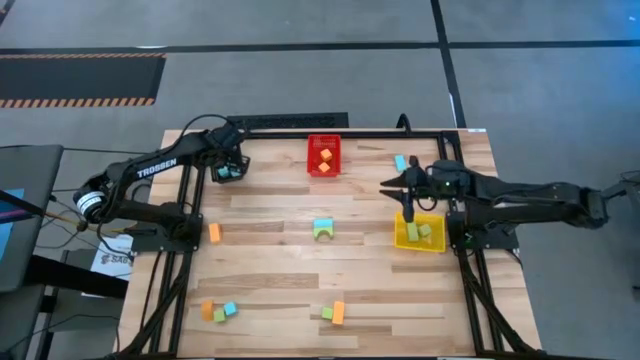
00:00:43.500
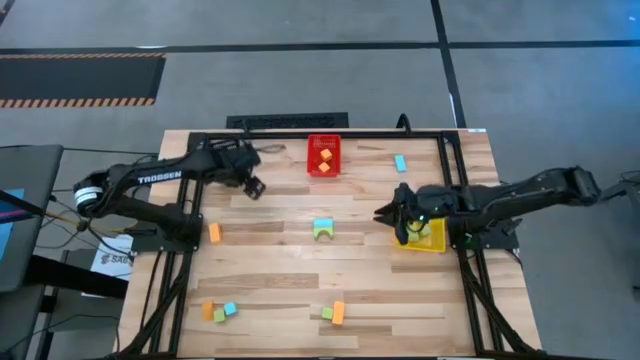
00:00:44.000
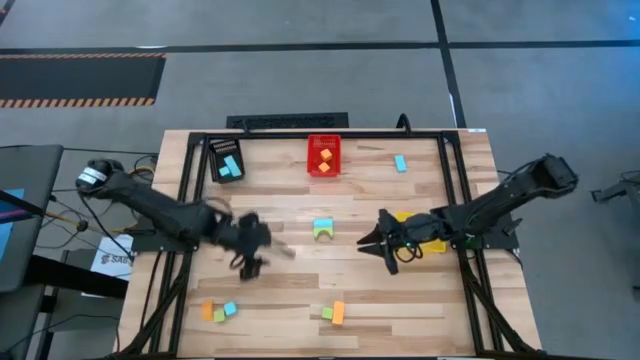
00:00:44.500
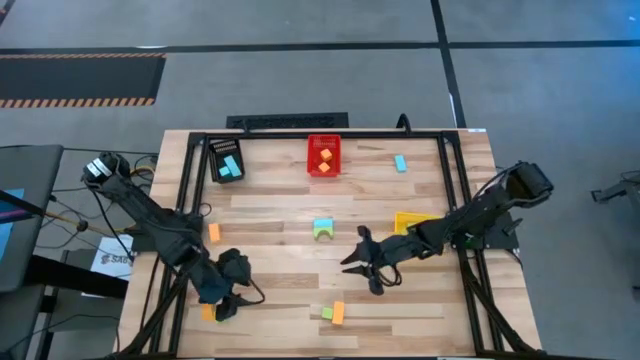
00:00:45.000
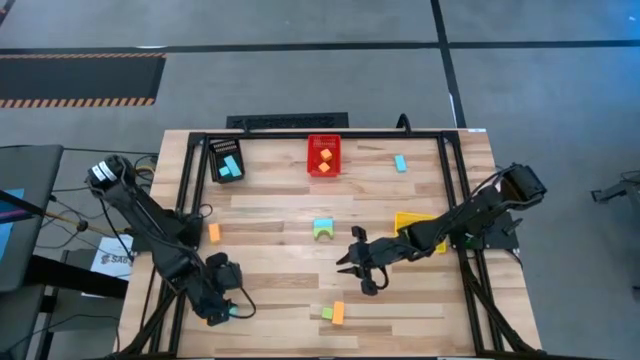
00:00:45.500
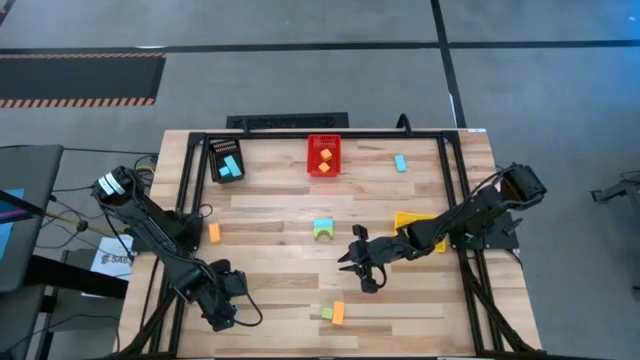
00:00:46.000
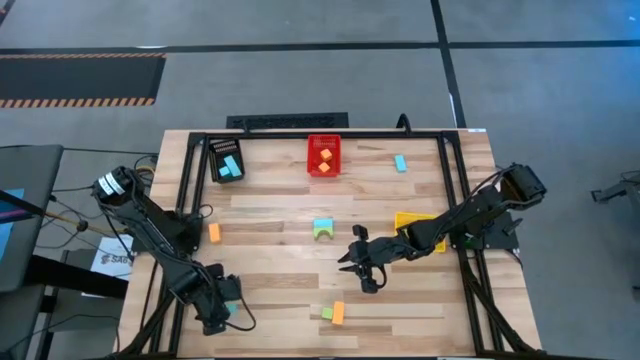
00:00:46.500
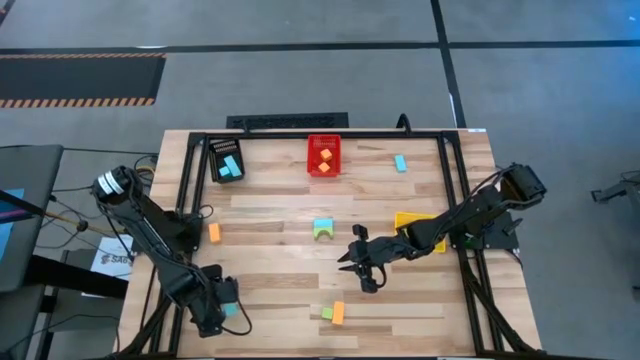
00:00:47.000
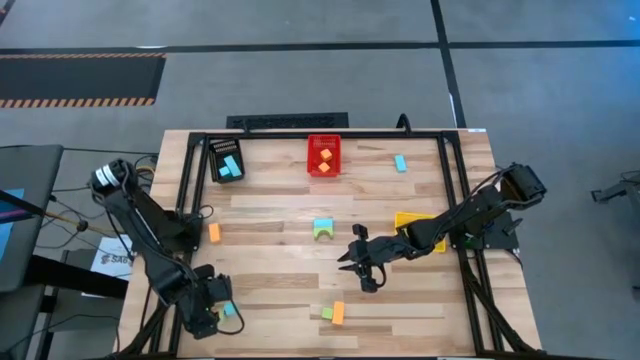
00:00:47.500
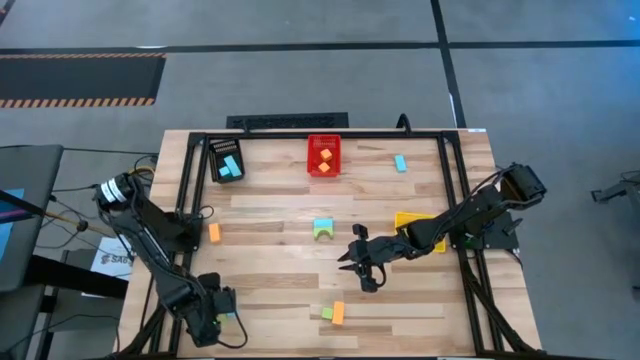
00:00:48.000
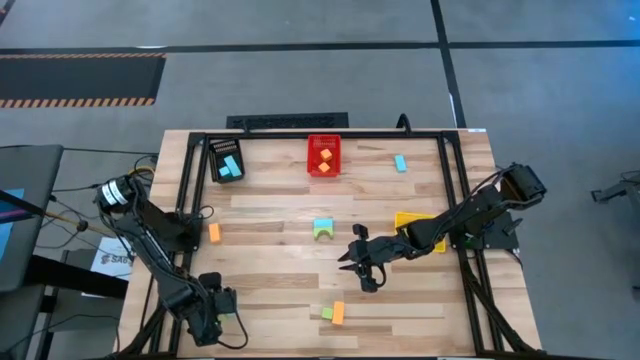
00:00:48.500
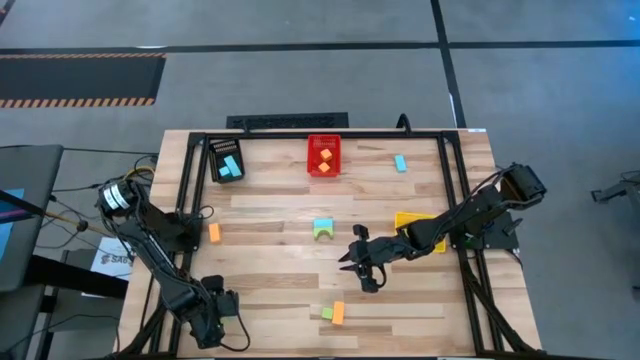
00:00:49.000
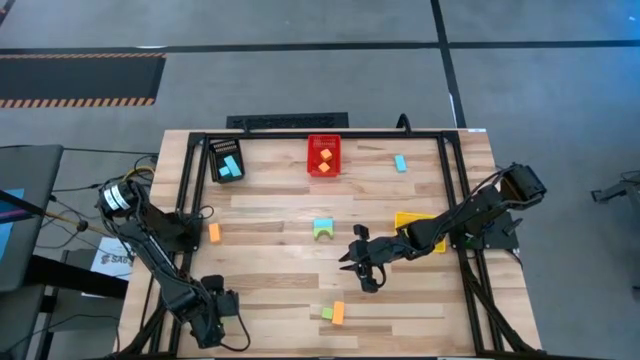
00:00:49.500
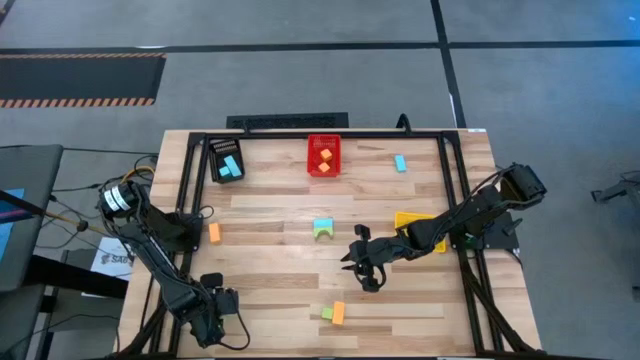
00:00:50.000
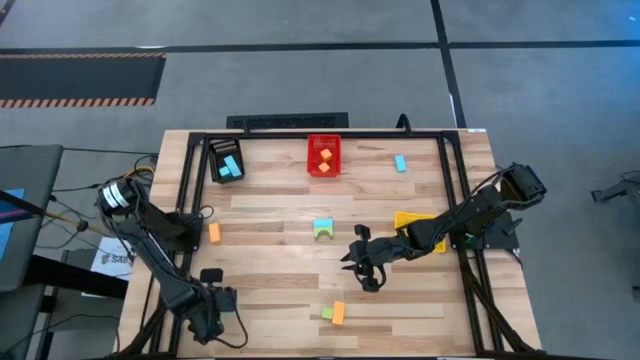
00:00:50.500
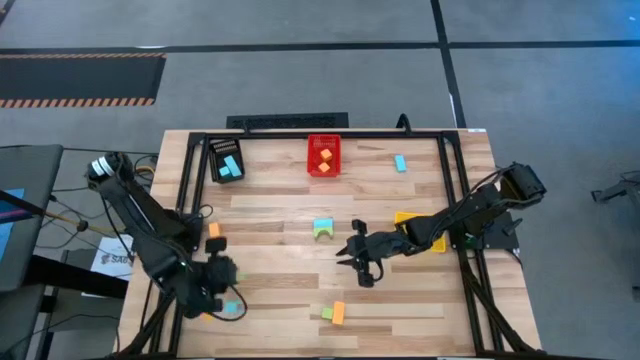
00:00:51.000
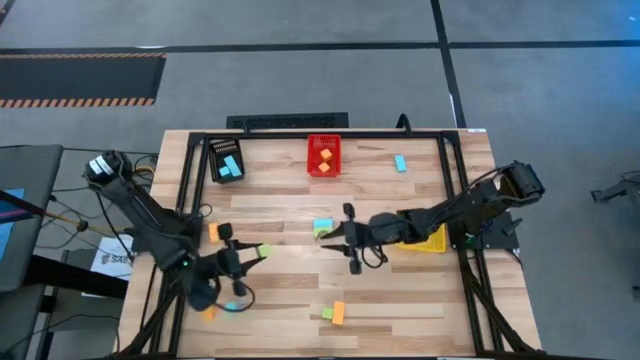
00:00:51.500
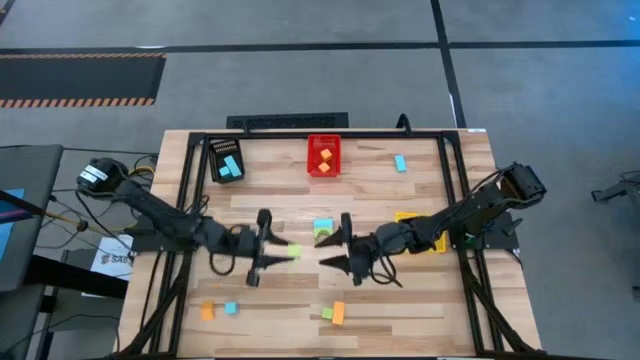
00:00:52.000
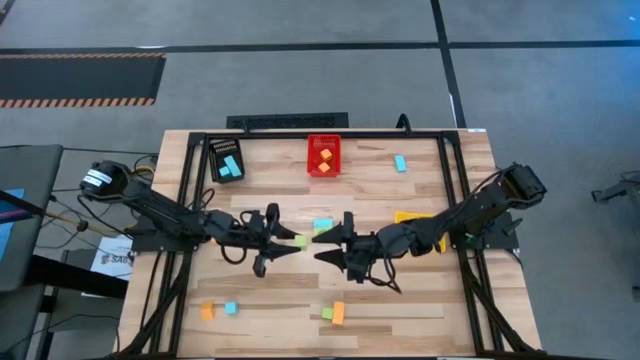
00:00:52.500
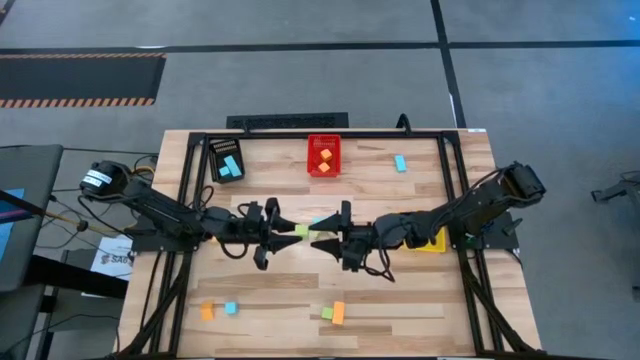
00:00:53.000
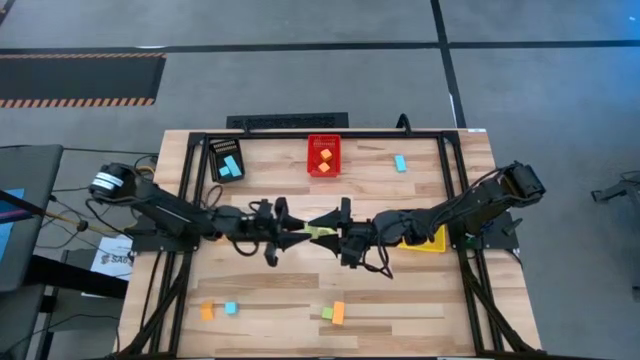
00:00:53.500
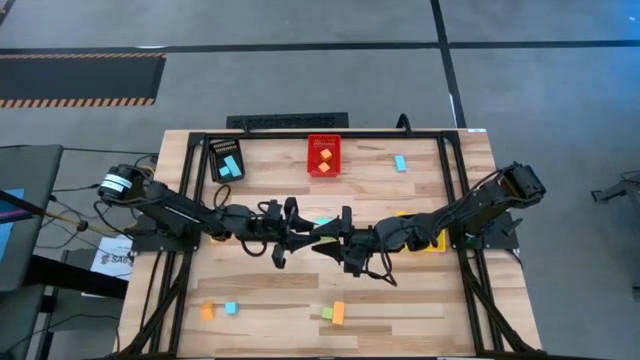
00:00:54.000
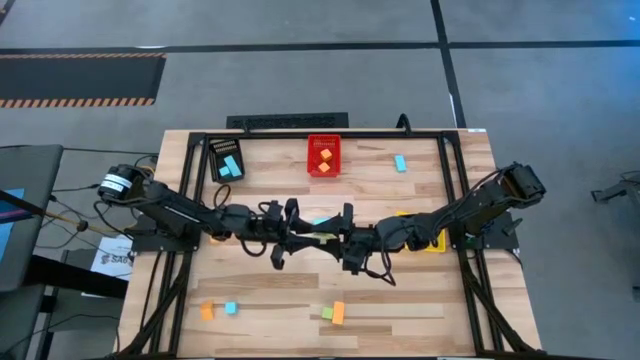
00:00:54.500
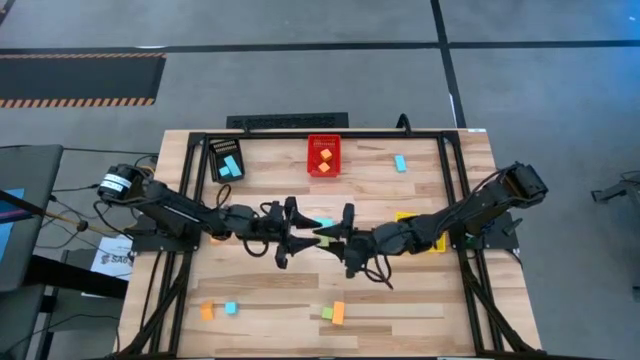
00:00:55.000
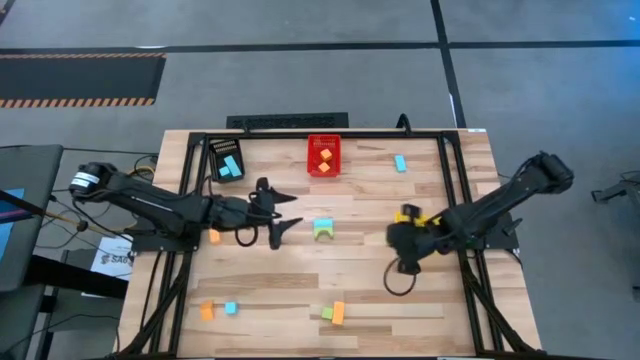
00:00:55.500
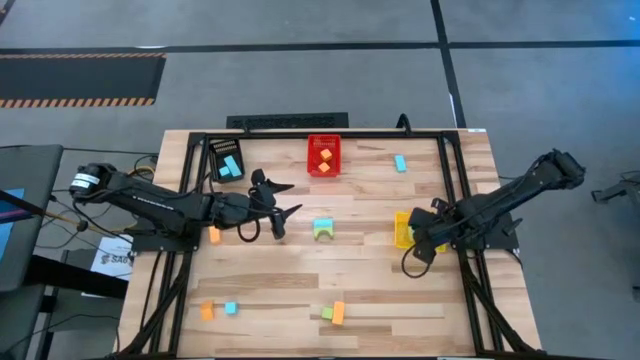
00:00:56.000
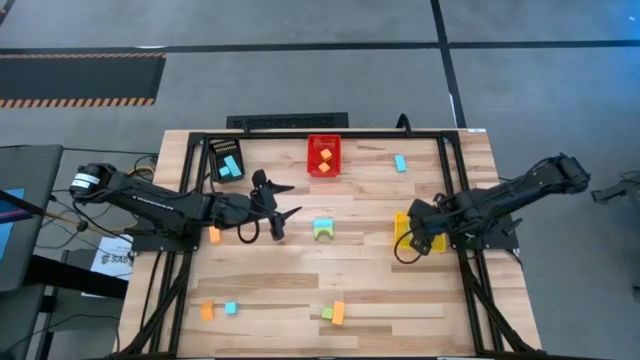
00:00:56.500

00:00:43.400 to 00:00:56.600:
Task: Sort & place blocks by color
Put the green block into the yellow bin

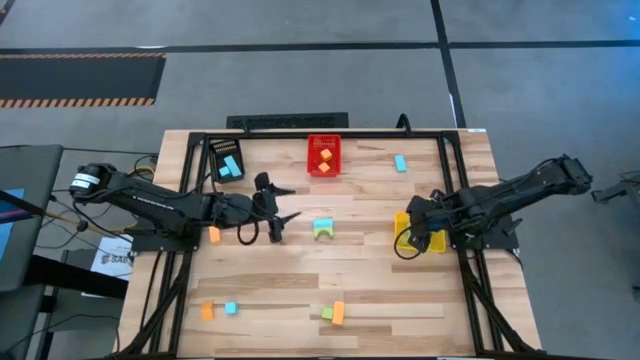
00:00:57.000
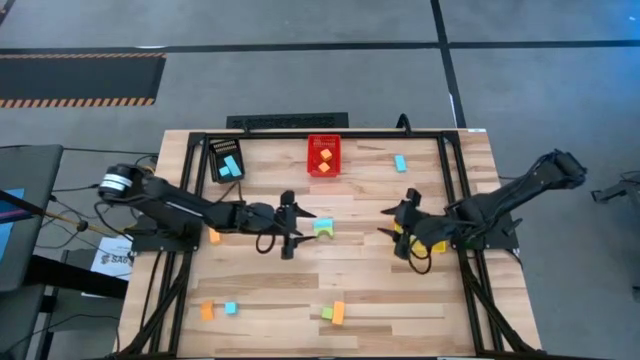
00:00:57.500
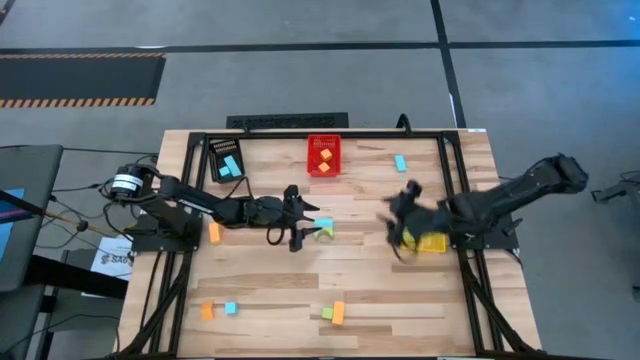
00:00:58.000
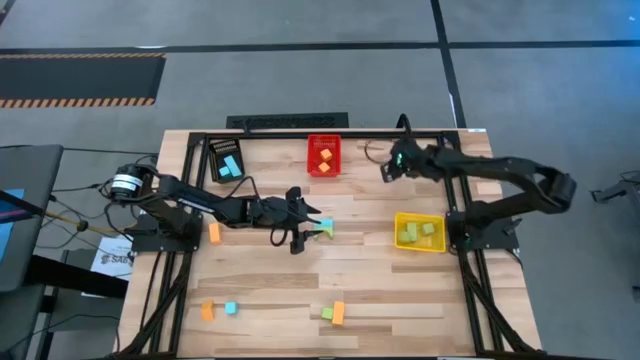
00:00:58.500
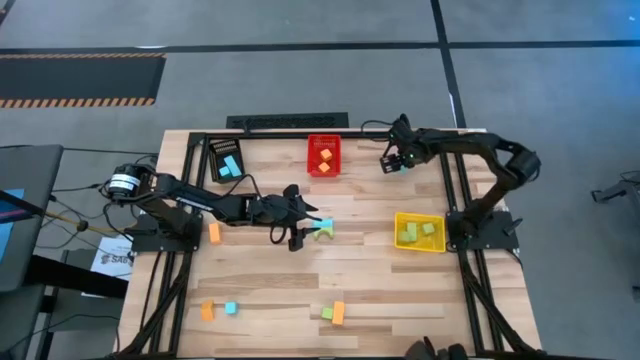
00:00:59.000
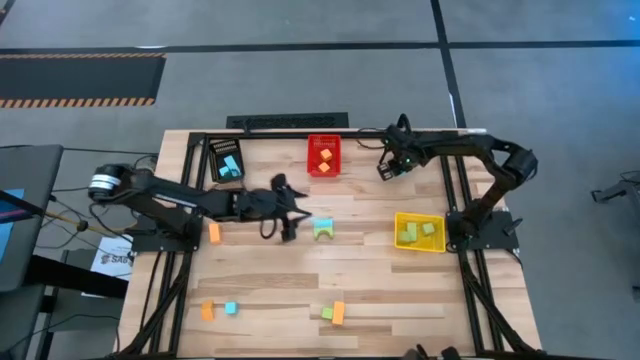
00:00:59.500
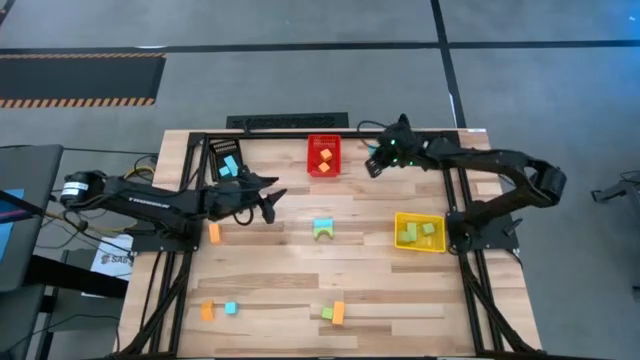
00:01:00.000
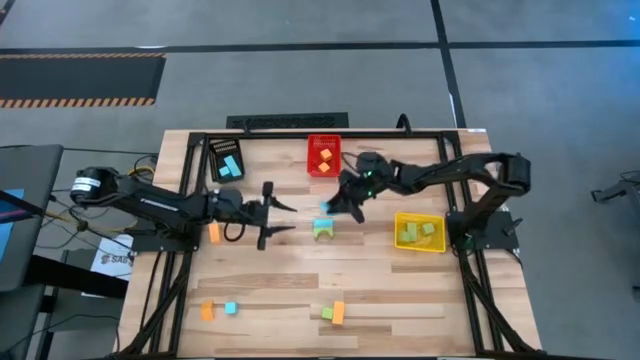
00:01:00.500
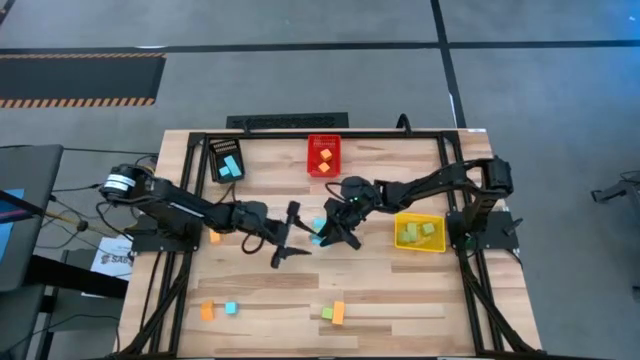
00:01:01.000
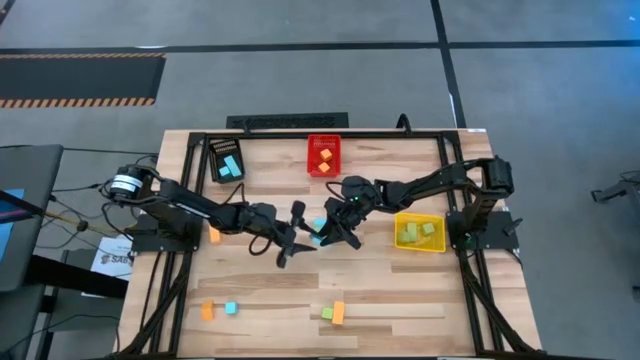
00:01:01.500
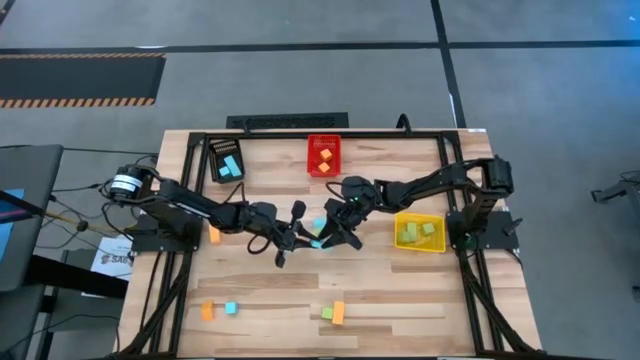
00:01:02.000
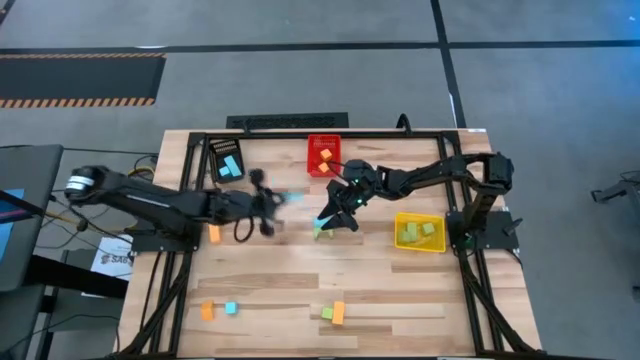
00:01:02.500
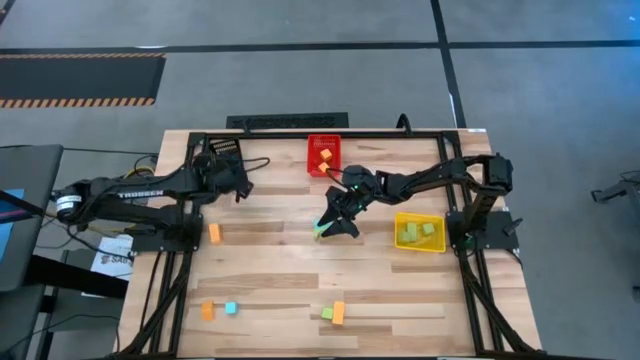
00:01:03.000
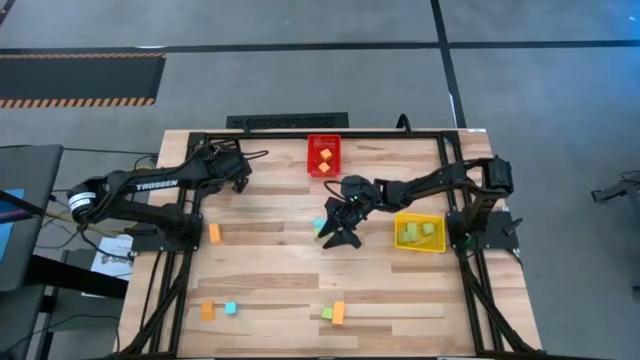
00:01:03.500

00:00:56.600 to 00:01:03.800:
Put the blue block into the black bin

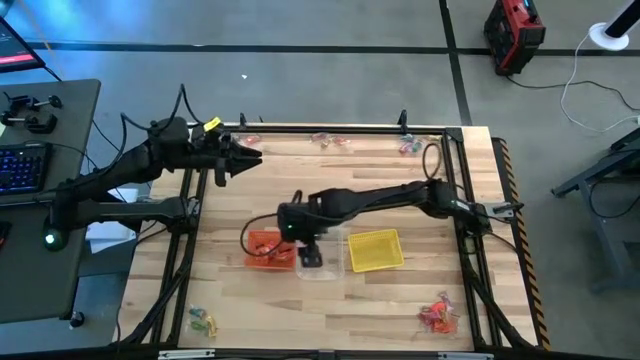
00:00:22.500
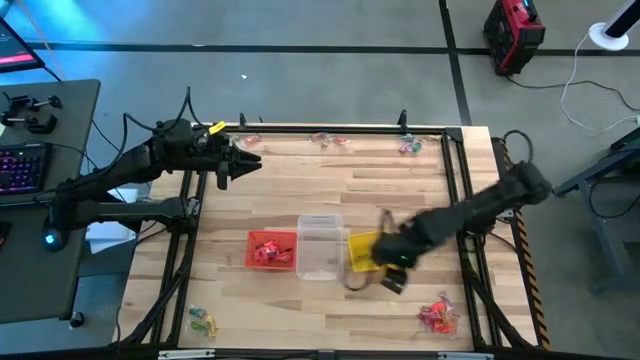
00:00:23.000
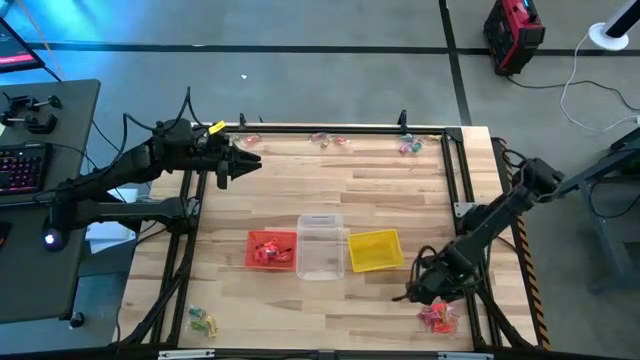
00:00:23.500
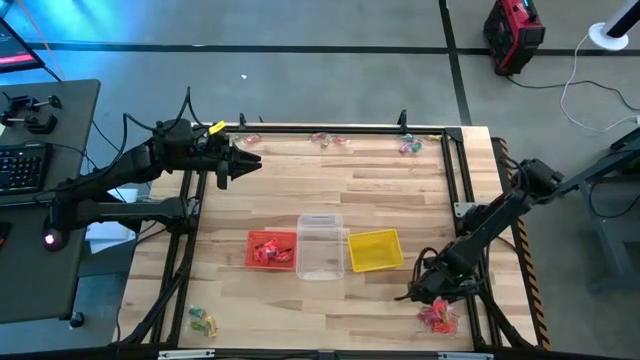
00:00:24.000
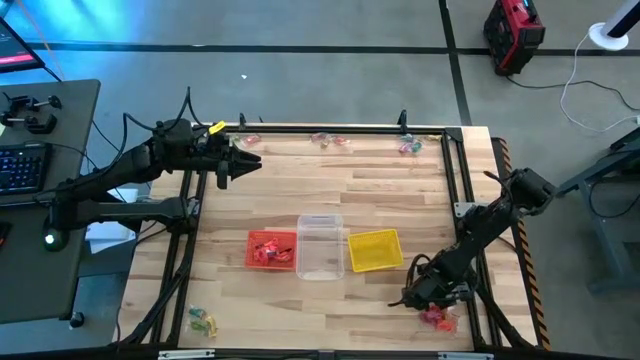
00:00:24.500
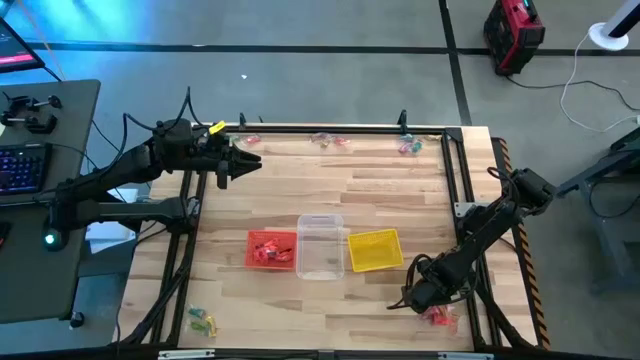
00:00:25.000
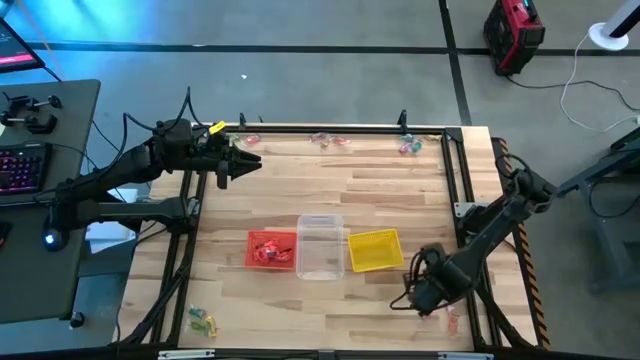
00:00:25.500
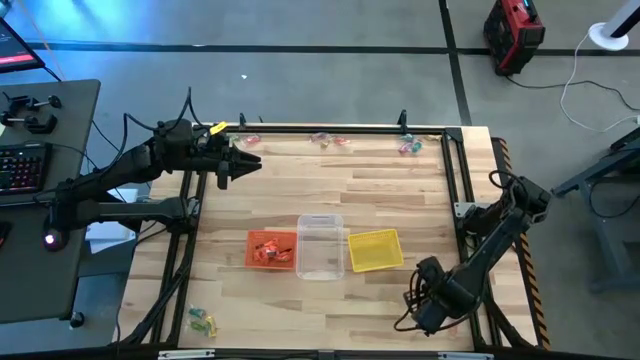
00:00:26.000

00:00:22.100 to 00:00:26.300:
Task: Sort candy by brand, put in halloween buckets
Put the orange chocolate bar into the orange bin
